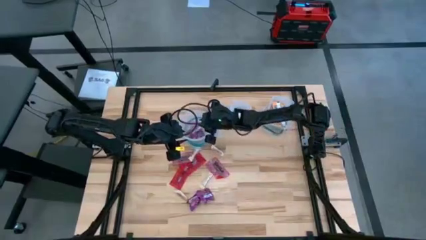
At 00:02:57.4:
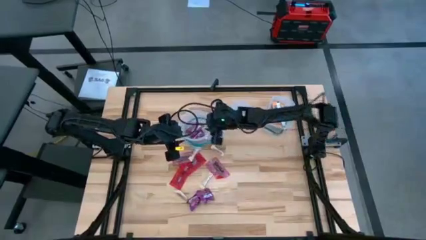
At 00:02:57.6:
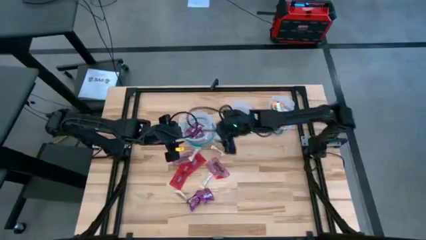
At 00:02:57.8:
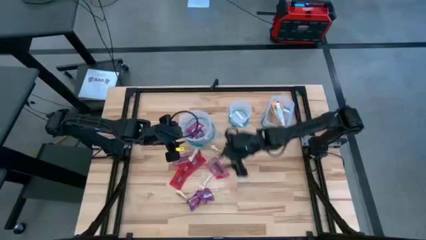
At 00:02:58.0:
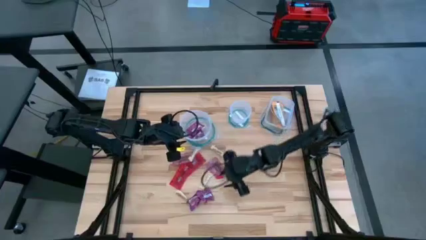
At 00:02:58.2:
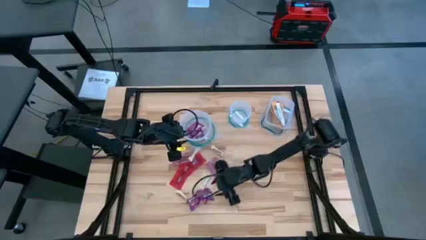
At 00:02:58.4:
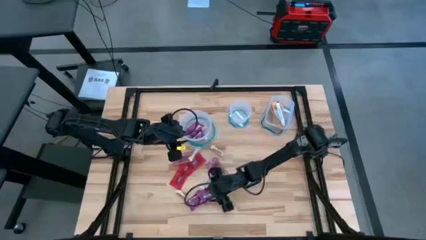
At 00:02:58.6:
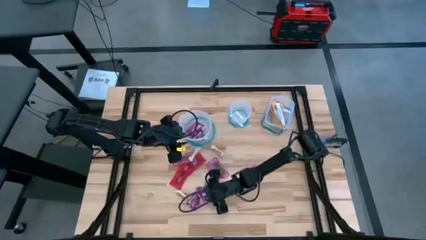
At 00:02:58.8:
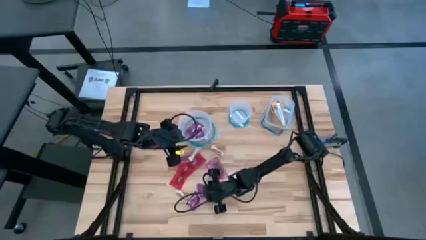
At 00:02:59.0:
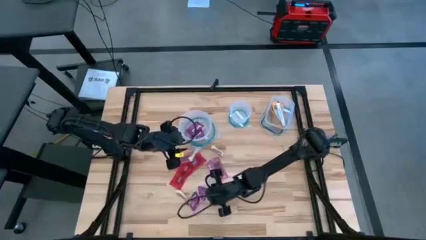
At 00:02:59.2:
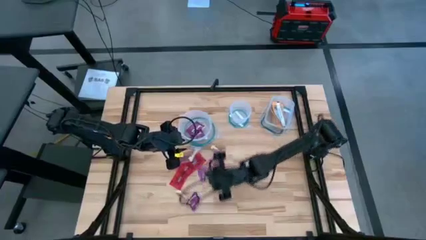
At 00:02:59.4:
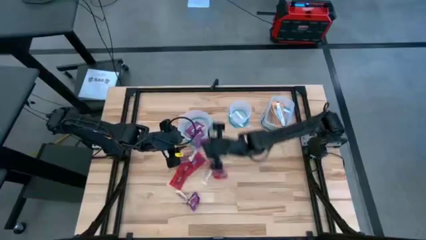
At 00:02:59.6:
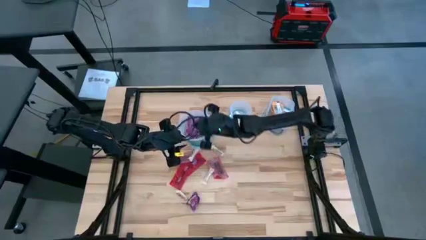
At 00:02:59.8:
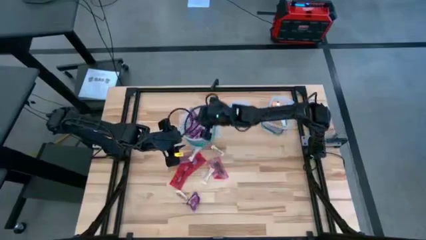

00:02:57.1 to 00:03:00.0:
Task: Sort candy
Put the violet candy into the big round transparent bin

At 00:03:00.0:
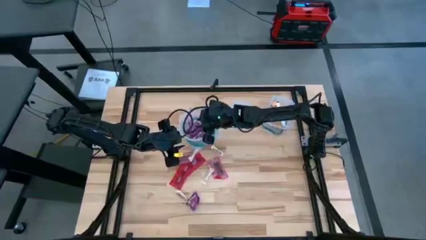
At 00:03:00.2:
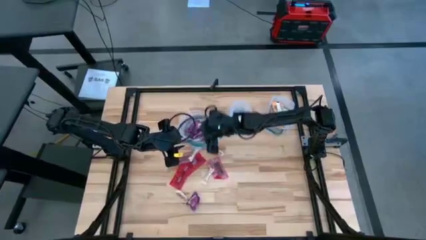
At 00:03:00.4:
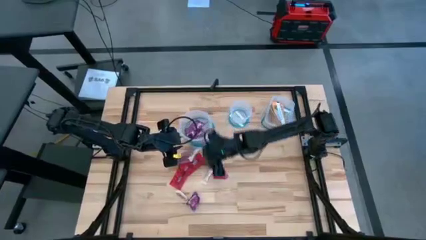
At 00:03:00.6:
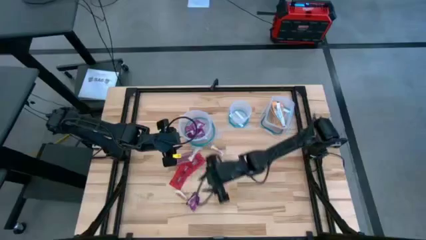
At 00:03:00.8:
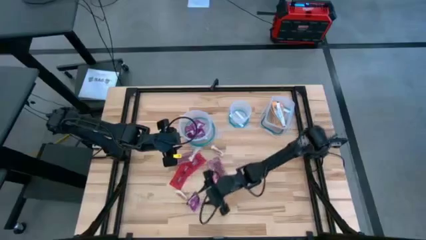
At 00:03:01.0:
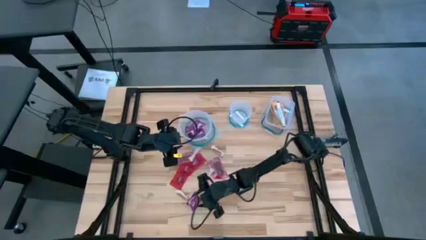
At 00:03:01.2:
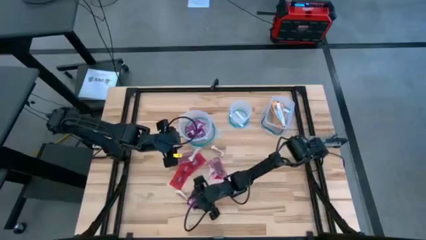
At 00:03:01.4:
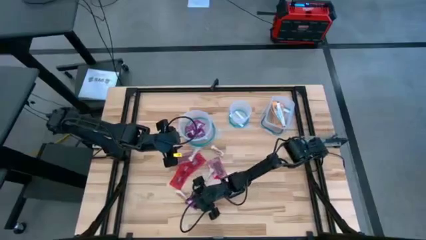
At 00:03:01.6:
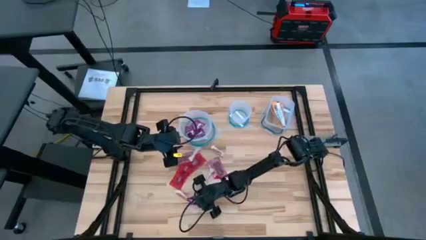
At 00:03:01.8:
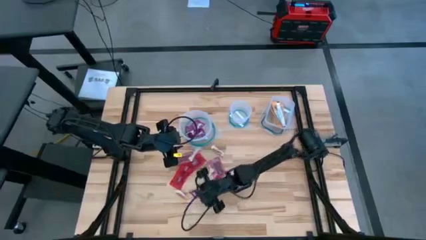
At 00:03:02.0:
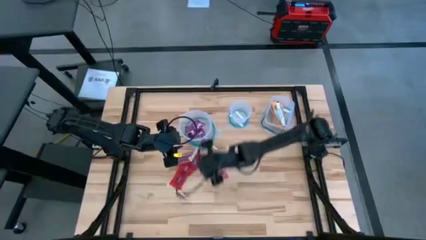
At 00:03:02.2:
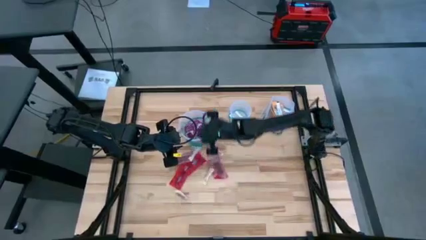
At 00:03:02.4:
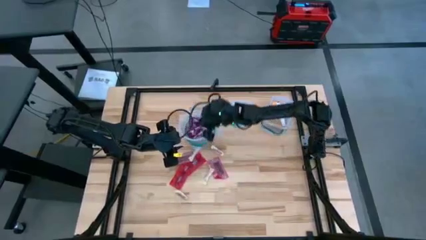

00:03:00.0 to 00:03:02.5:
Put the violet candy into the big round transparent bin

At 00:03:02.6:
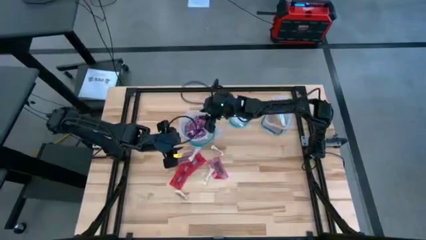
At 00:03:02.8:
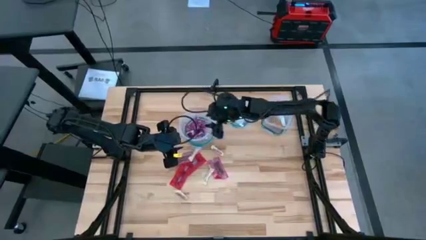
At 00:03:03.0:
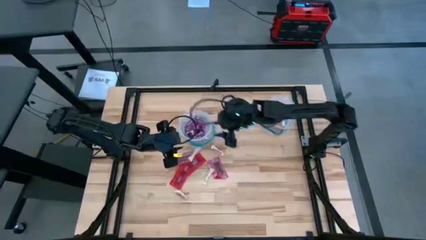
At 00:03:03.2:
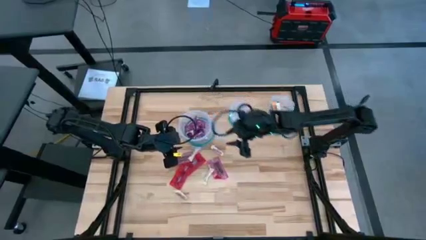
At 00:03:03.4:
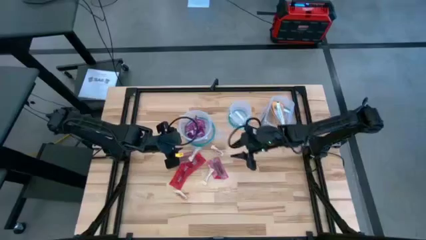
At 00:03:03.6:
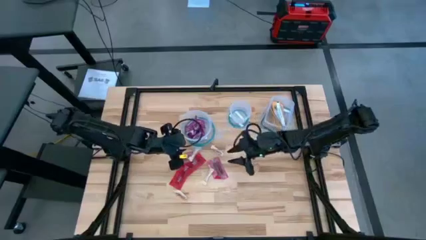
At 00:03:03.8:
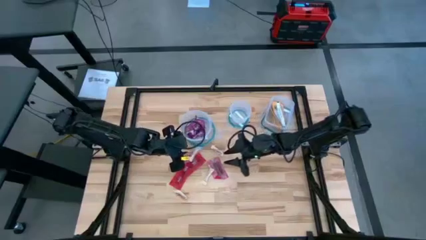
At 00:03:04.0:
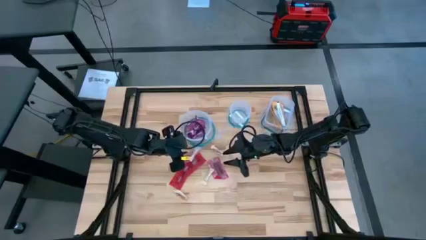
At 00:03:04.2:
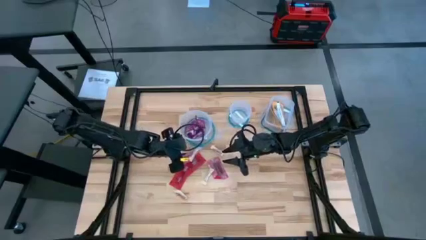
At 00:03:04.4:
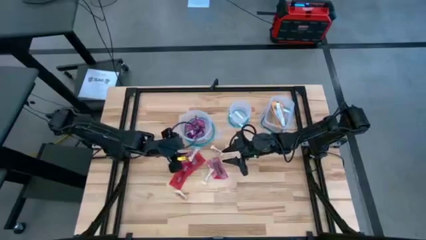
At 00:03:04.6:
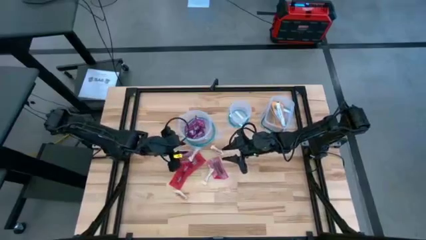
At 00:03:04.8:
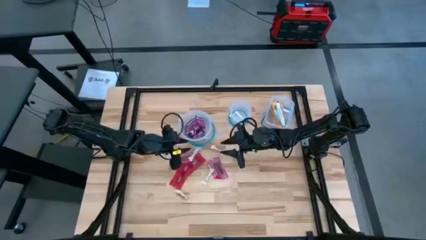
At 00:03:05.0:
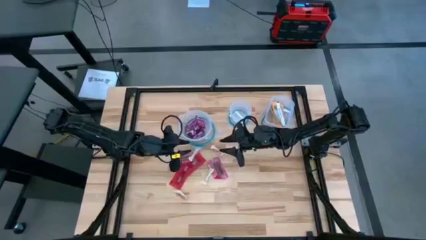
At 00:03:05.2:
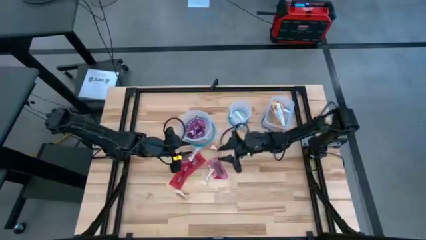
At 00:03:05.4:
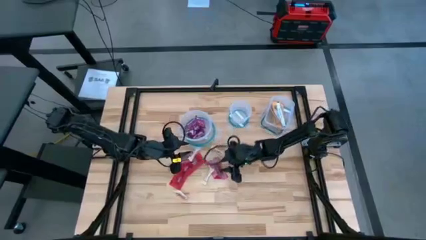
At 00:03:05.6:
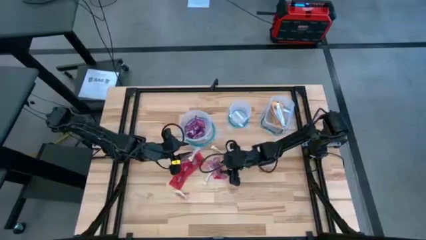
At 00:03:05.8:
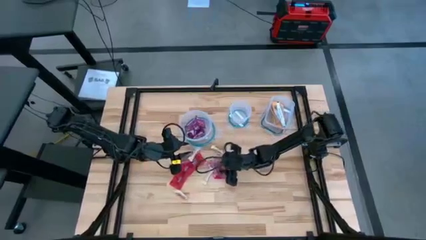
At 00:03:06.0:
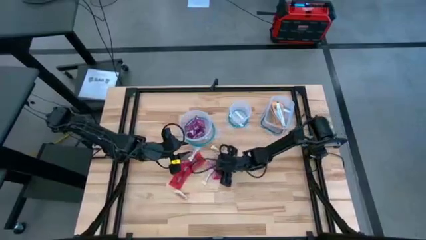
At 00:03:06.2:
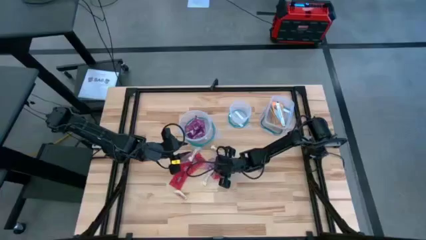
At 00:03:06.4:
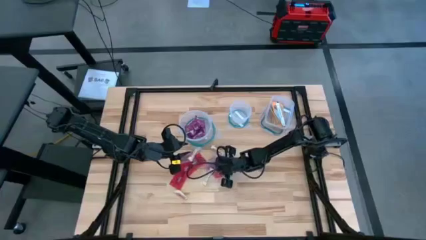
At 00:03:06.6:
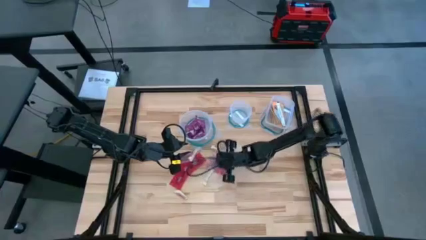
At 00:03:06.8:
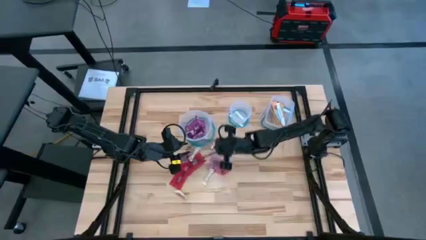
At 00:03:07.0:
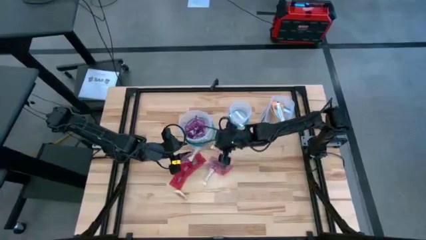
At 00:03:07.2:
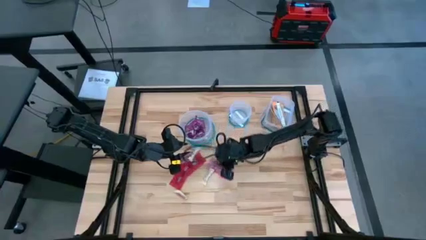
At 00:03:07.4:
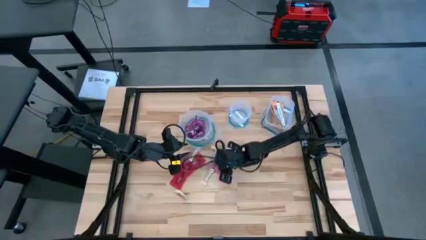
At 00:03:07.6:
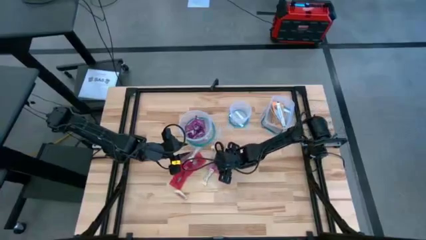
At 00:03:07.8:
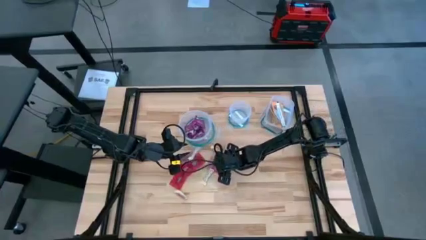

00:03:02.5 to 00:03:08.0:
Put the red candy into the big round transparent bin

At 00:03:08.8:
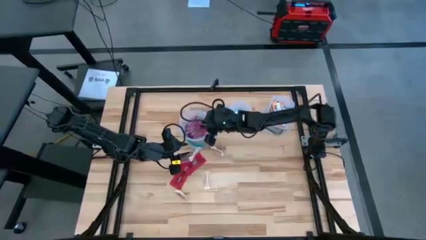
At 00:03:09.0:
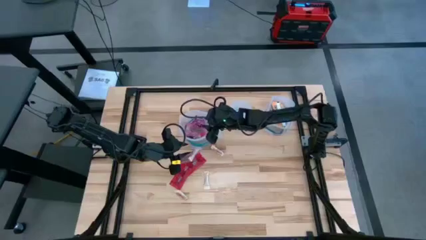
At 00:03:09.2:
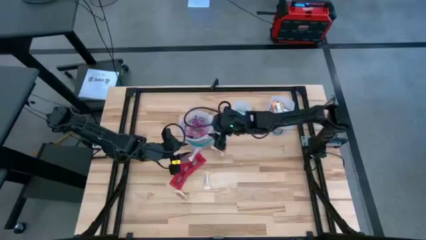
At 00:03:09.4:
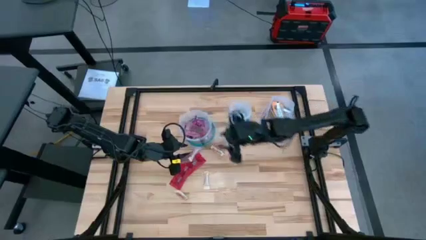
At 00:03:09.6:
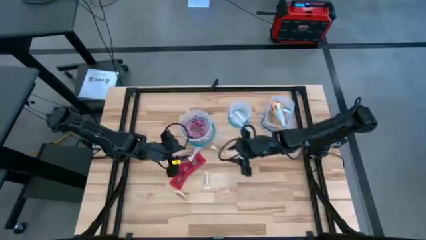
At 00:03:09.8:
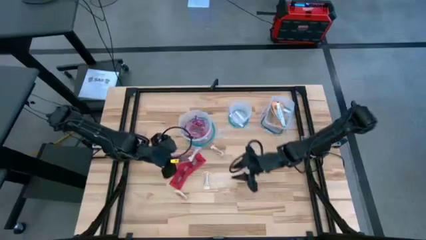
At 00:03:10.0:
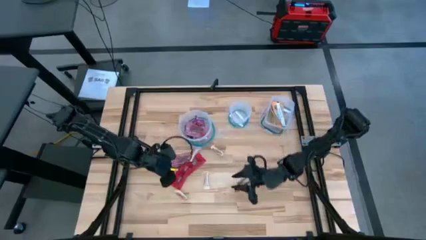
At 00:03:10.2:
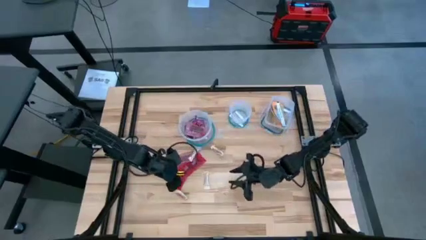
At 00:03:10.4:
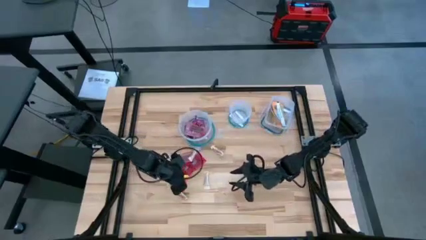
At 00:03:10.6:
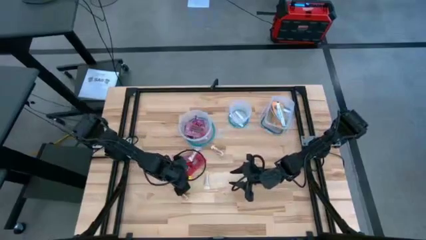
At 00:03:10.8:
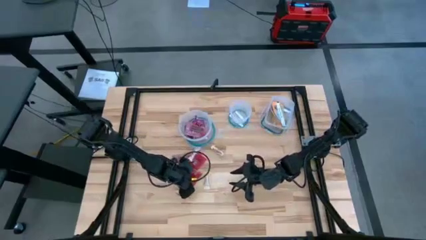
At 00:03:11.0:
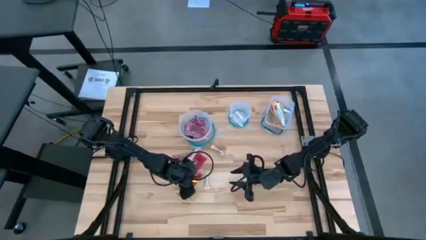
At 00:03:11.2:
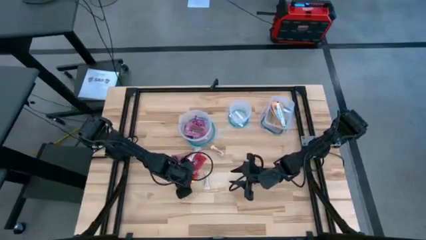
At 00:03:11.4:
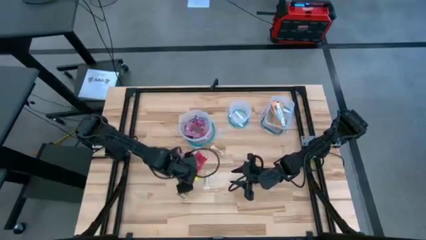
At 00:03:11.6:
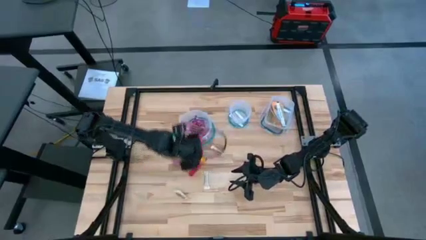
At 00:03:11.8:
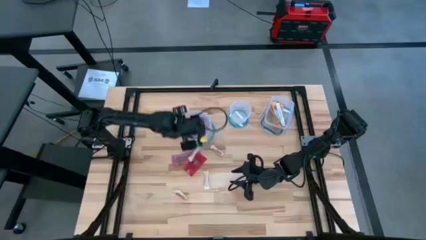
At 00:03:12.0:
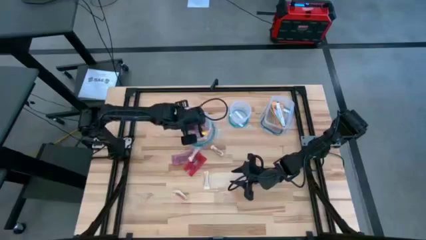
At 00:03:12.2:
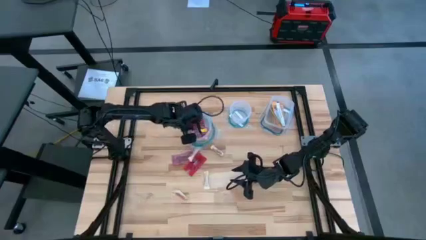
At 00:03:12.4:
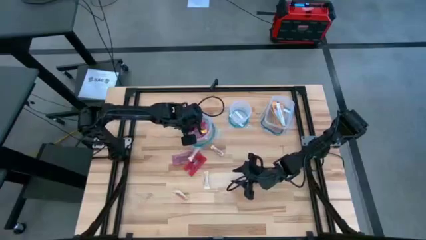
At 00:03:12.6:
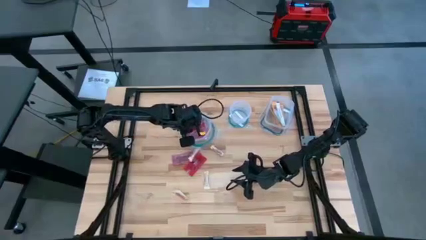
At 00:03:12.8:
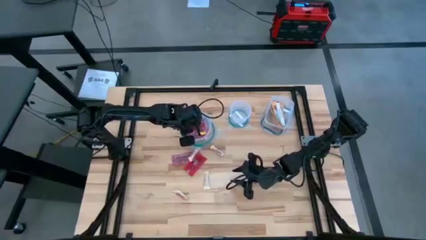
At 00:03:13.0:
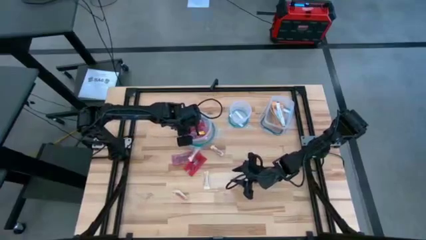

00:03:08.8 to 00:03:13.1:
Put the red candy into the big round transparent bin

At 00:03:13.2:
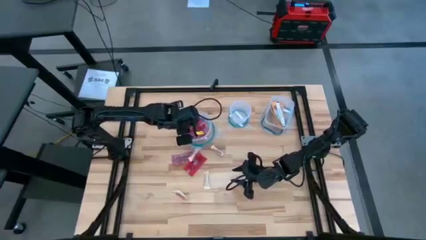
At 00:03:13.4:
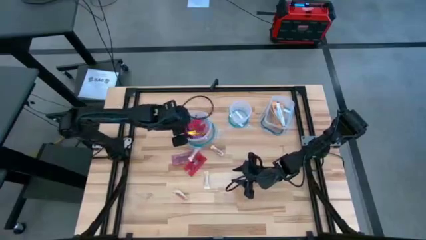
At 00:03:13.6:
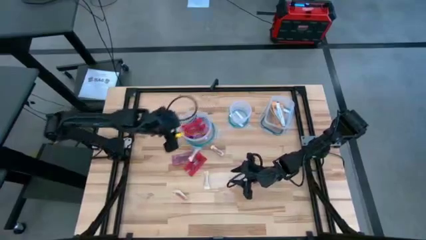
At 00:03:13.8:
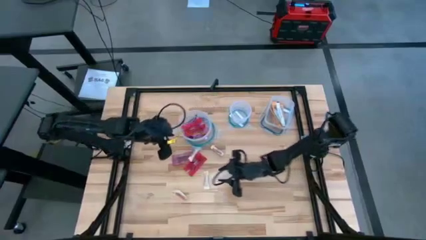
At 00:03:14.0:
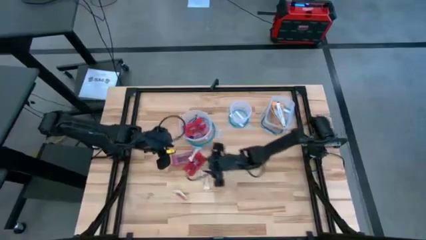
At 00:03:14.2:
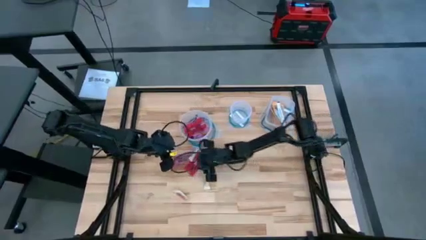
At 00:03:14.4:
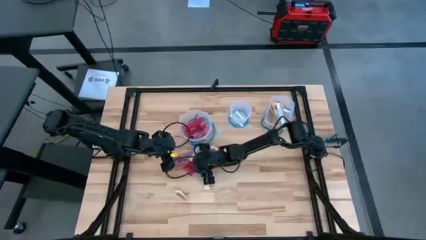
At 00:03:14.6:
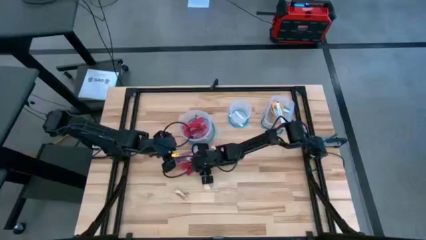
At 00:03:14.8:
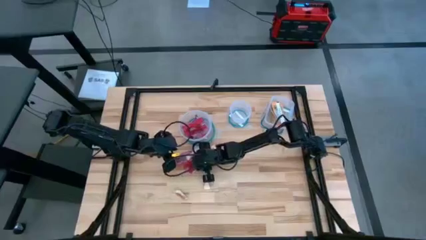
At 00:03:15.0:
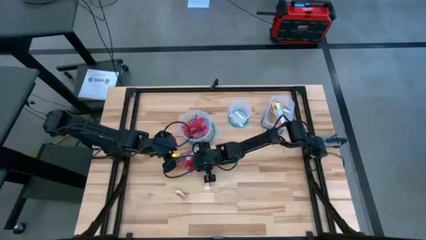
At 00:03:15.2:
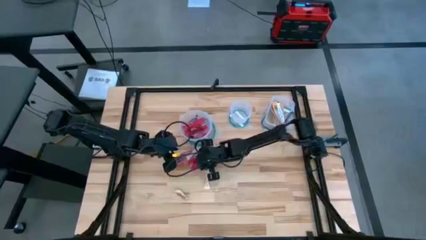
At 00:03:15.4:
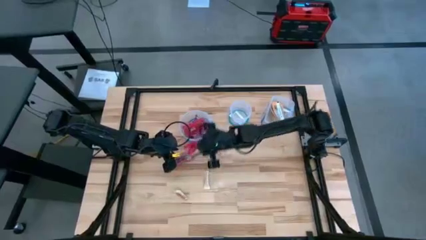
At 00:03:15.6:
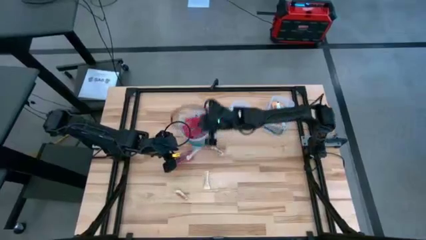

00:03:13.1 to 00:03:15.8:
Put the red candy into the big round transparent bin
